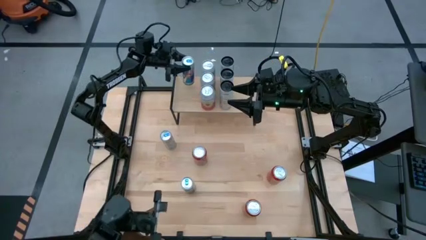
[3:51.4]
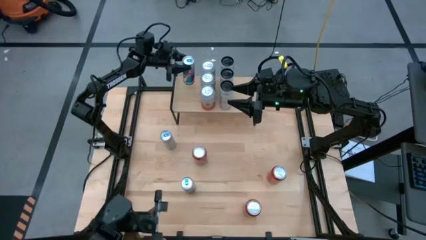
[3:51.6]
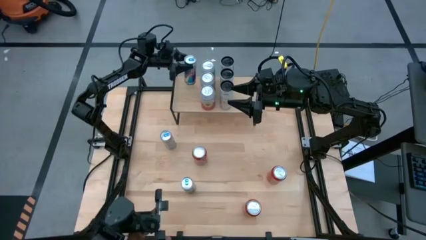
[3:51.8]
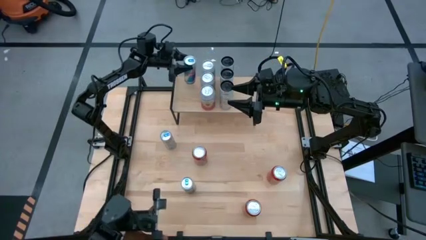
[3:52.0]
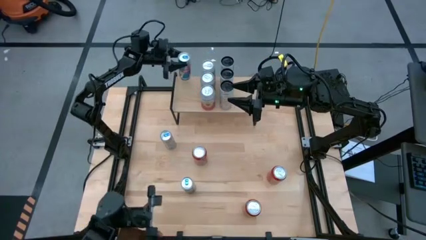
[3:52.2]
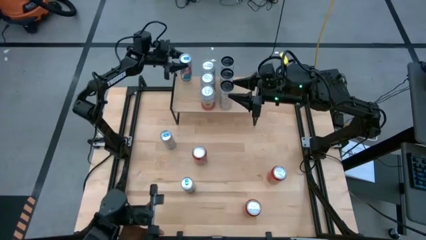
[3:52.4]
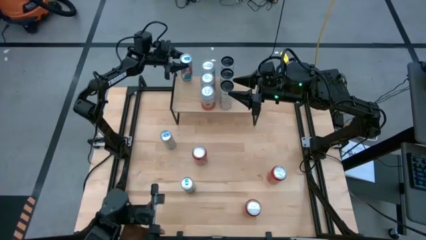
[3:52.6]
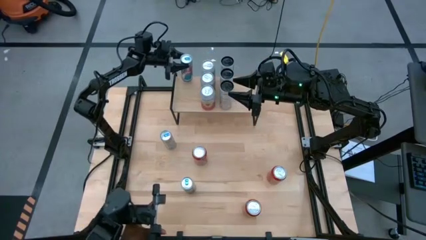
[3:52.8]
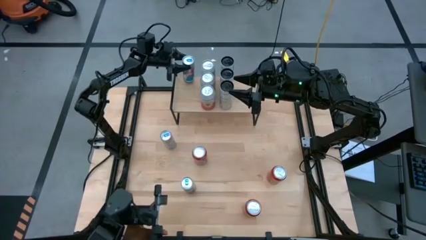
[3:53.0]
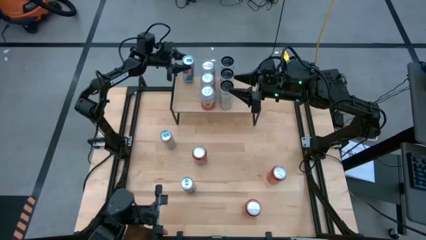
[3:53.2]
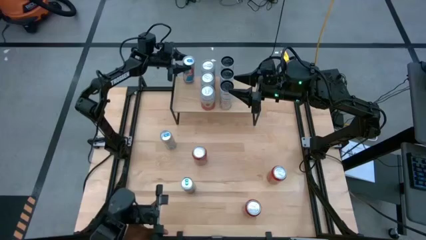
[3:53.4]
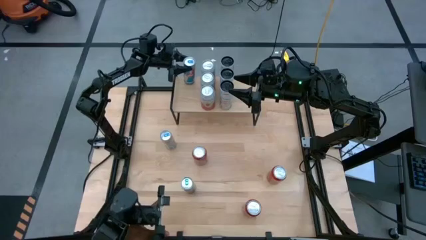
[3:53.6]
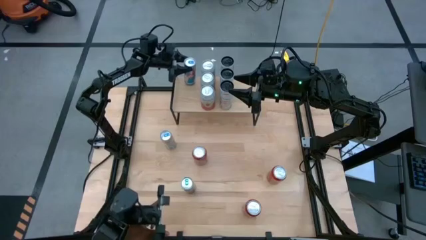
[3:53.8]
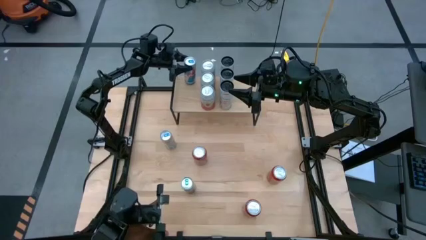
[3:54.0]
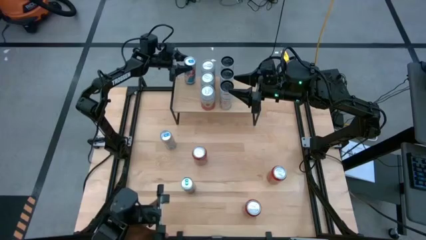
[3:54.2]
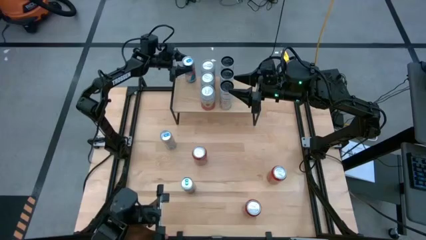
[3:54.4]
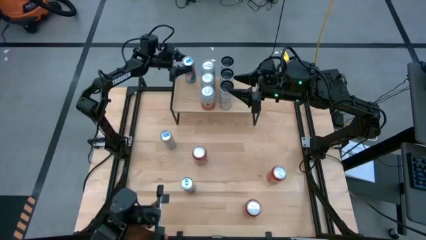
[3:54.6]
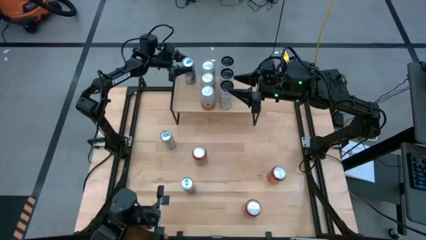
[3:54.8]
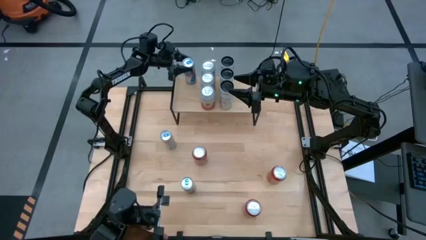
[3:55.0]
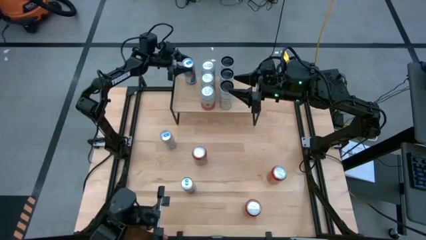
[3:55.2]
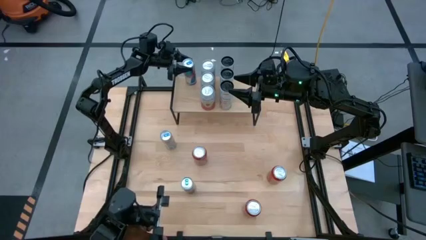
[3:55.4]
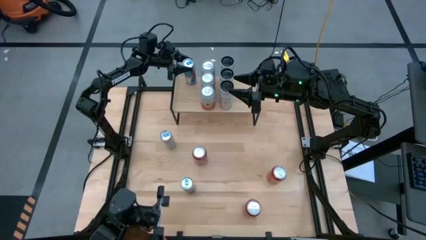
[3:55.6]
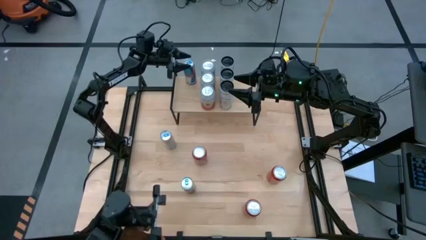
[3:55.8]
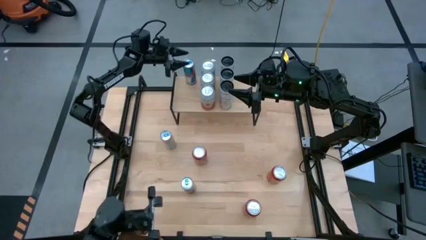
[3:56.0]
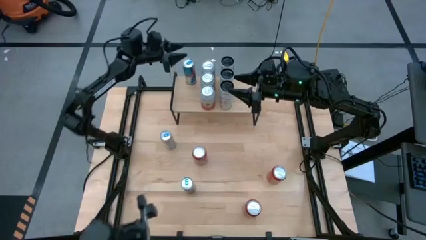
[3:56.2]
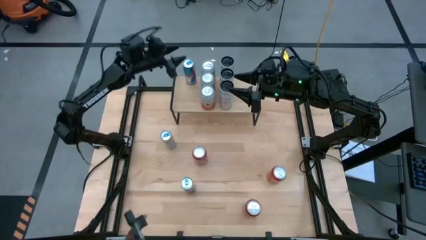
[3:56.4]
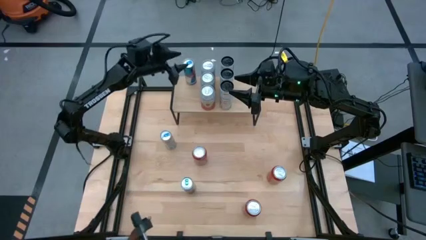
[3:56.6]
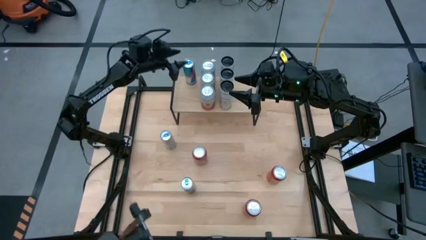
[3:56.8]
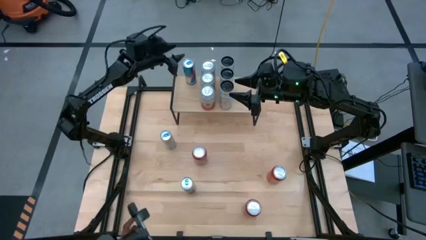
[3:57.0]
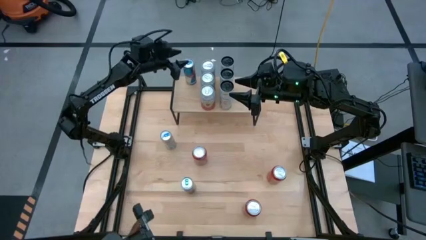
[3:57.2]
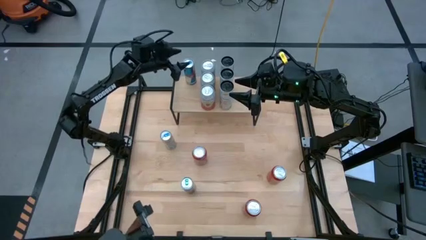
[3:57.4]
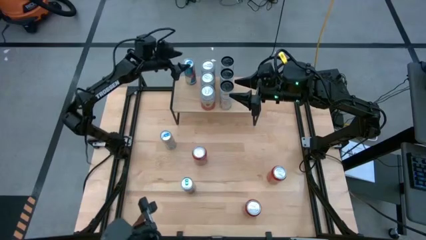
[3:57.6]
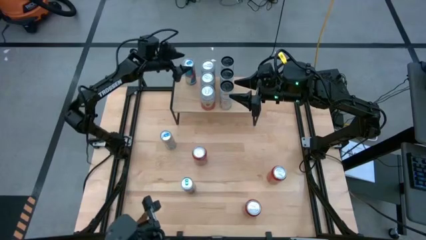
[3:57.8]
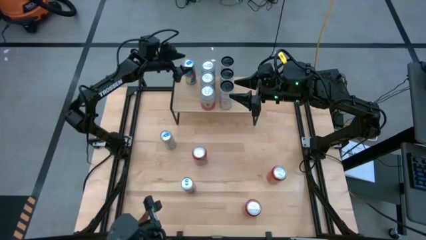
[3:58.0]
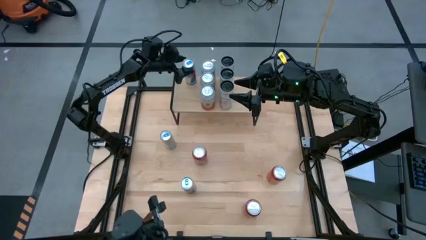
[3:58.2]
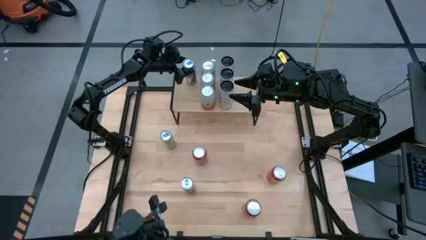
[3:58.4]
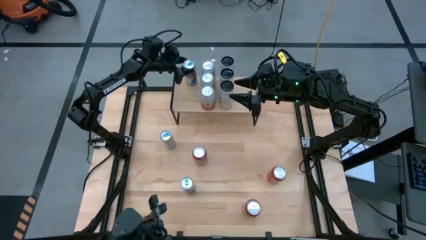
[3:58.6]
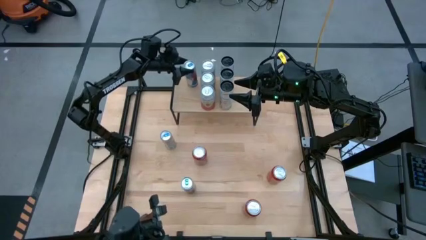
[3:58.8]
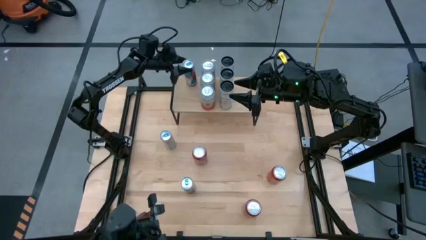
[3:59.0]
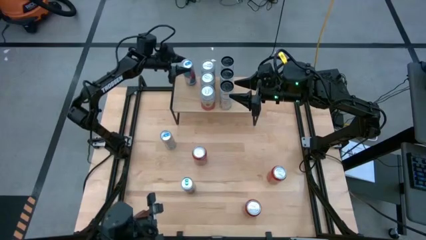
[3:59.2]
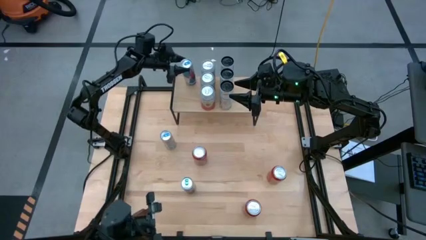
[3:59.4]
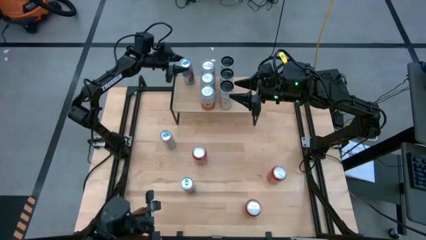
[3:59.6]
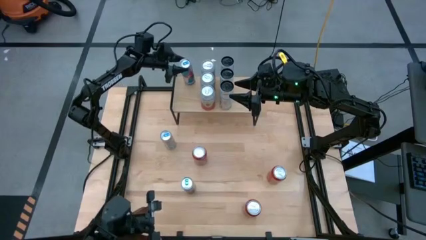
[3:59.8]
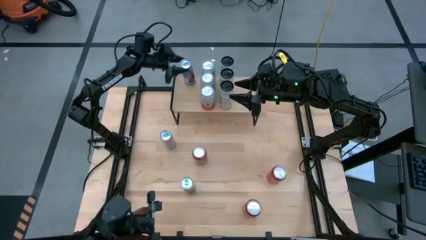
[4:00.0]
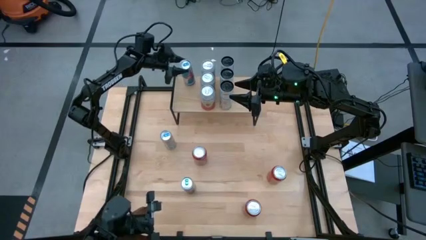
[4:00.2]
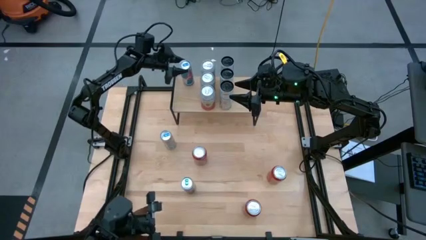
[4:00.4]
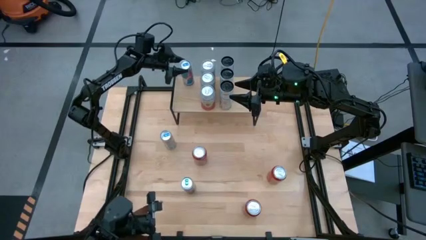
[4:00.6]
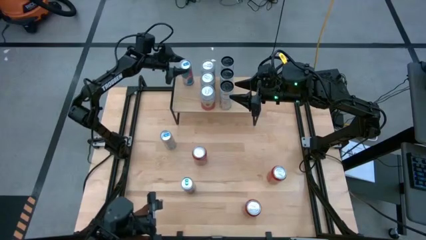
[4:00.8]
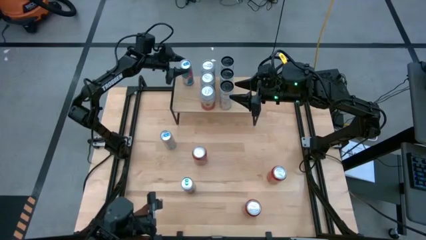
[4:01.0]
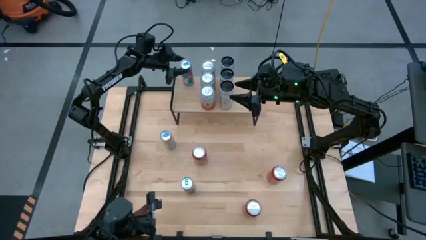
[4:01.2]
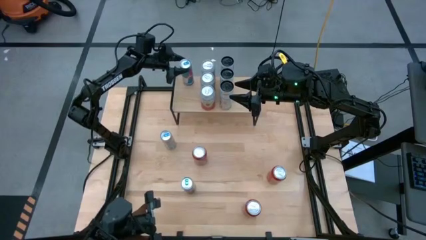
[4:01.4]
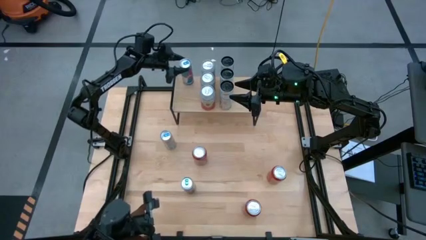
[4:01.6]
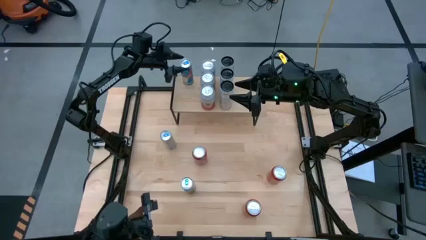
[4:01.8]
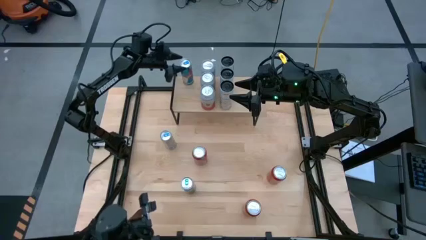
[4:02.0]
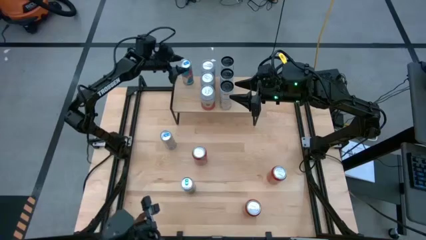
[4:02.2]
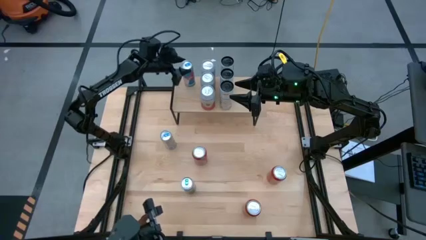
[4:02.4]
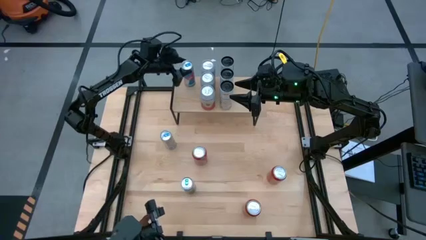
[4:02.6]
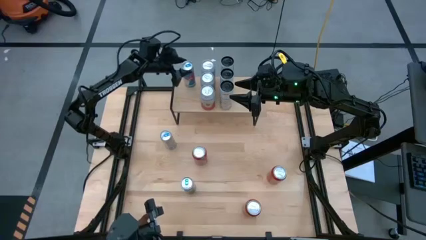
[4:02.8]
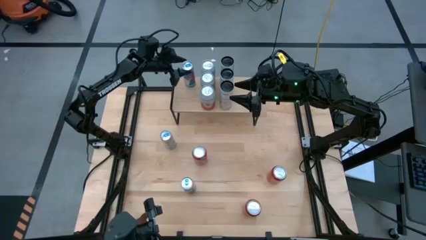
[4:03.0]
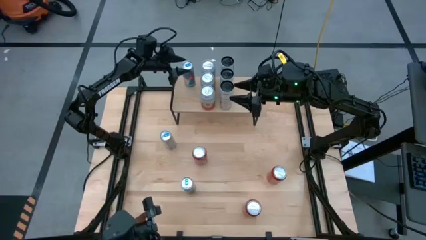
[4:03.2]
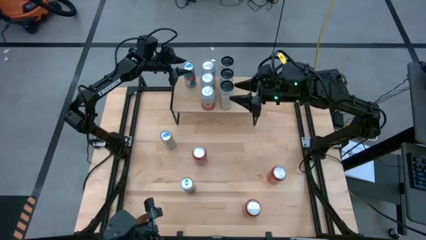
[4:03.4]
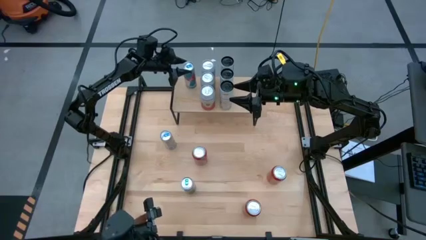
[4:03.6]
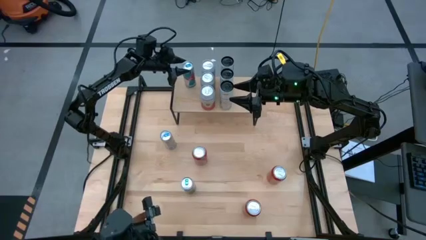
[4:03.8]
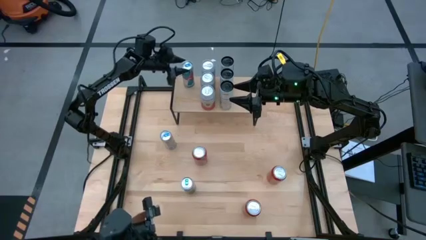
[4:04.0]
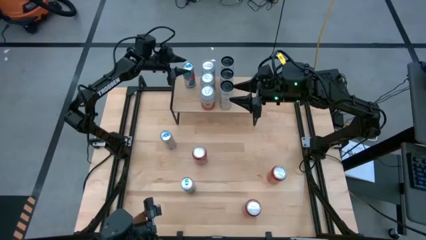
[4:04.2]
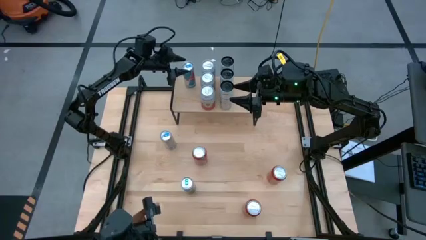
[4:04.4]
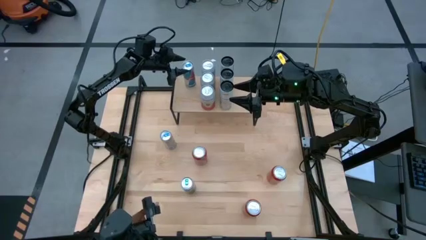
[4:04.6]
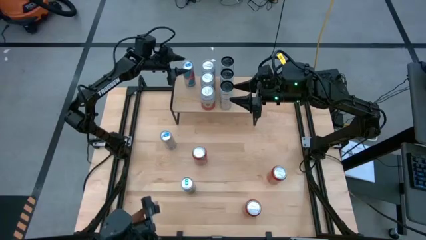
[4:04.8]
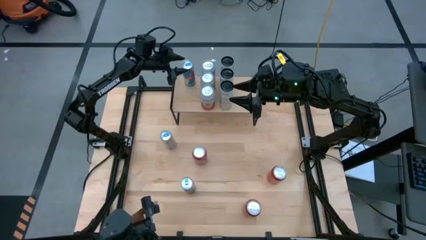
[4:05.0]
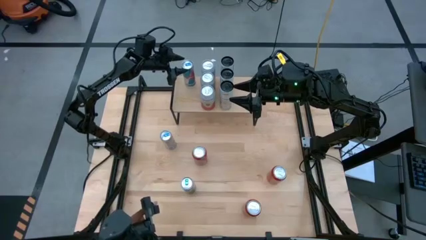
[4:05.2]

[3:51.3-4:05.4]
Task: Place canned beverage on shelf
Put the top right blue soda can on the shelf
